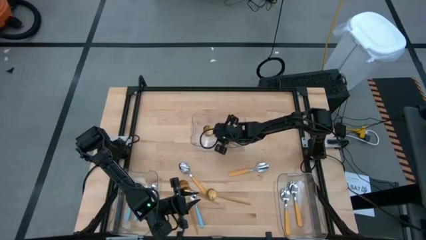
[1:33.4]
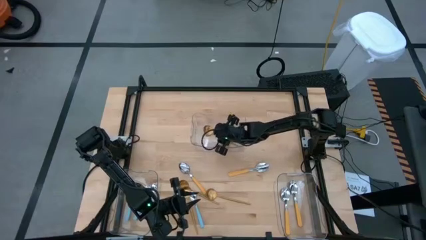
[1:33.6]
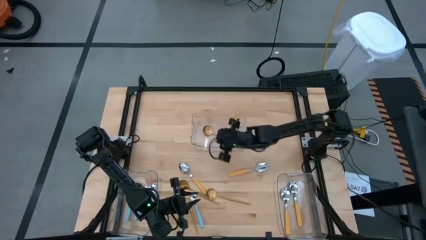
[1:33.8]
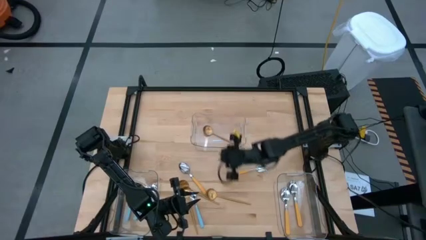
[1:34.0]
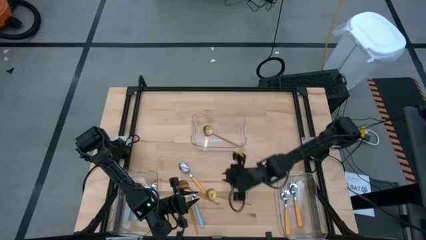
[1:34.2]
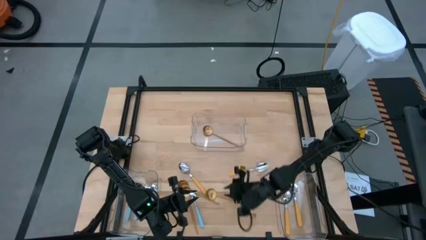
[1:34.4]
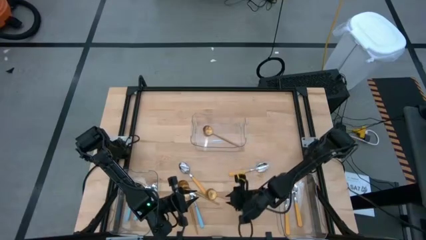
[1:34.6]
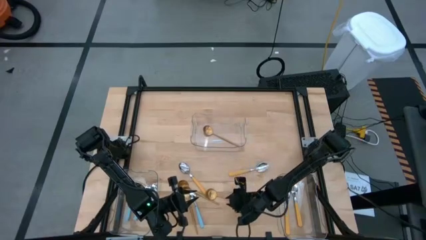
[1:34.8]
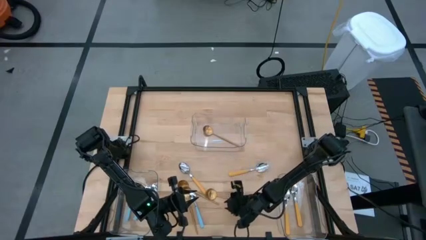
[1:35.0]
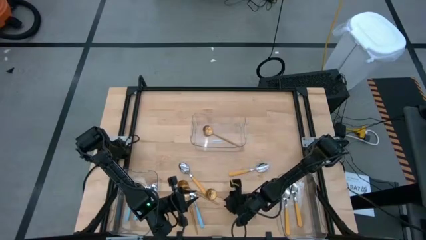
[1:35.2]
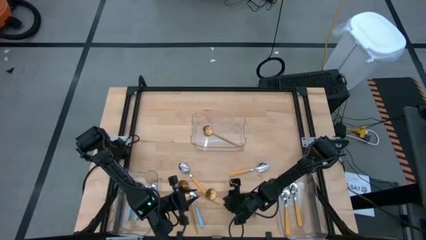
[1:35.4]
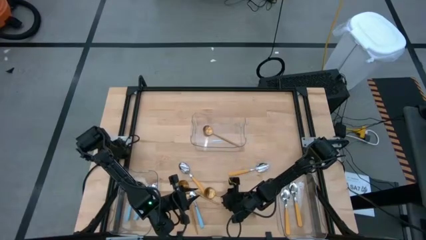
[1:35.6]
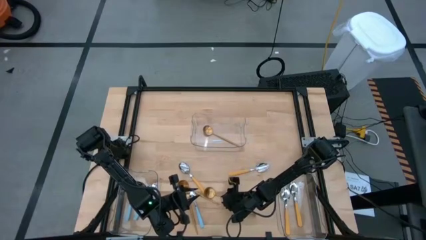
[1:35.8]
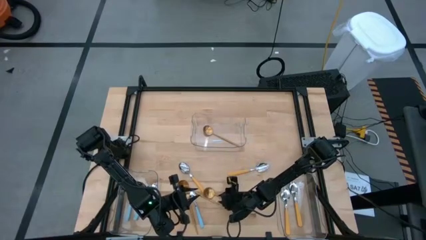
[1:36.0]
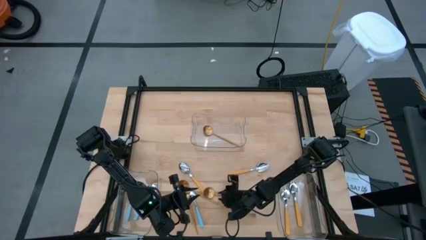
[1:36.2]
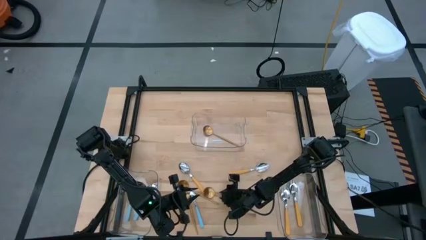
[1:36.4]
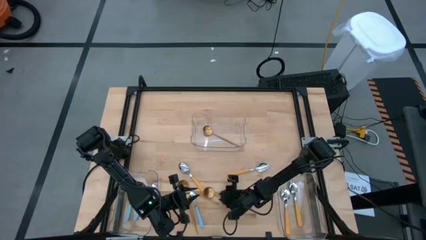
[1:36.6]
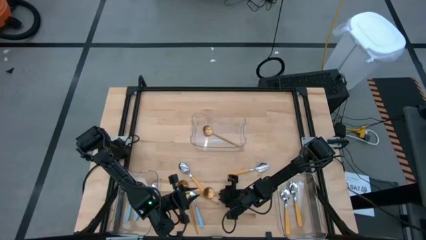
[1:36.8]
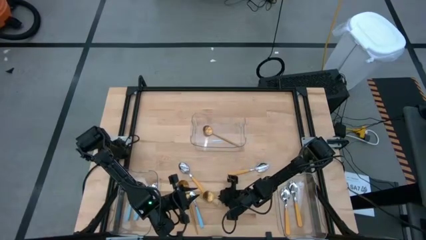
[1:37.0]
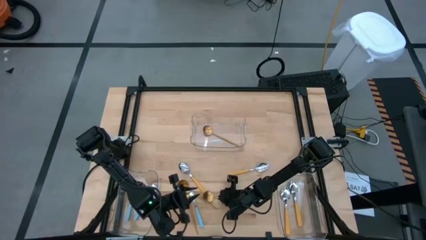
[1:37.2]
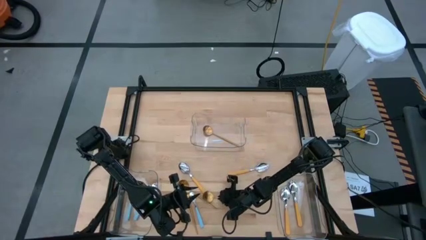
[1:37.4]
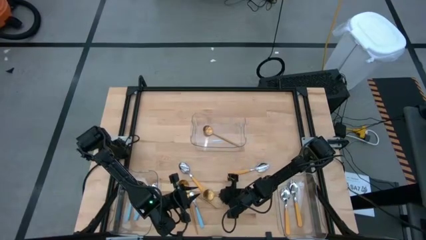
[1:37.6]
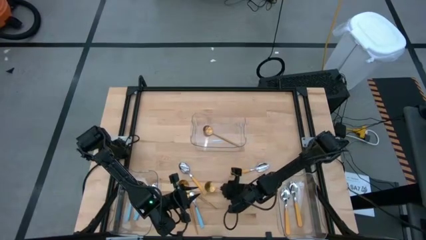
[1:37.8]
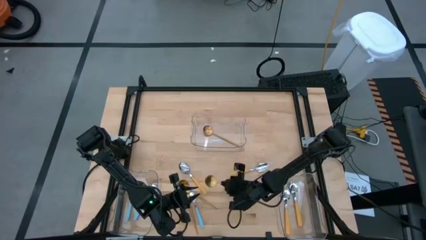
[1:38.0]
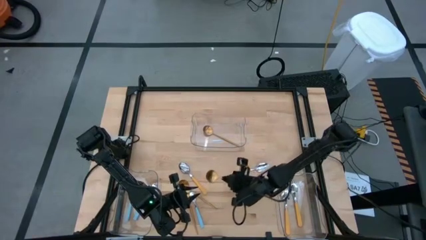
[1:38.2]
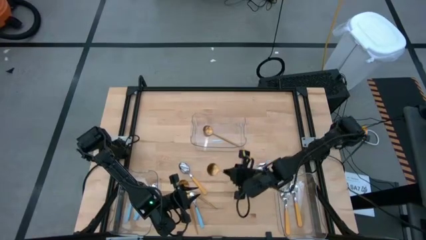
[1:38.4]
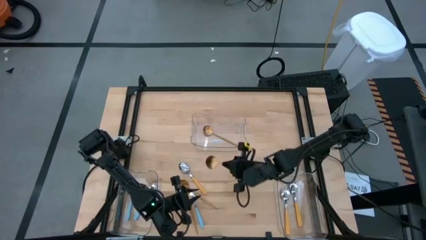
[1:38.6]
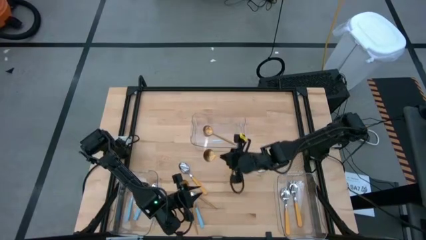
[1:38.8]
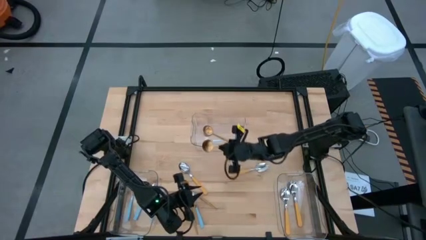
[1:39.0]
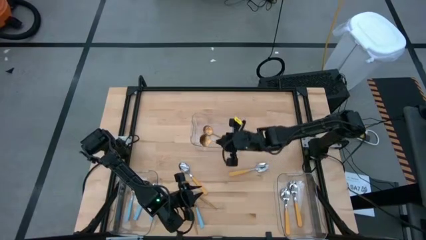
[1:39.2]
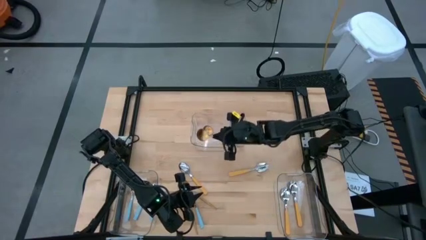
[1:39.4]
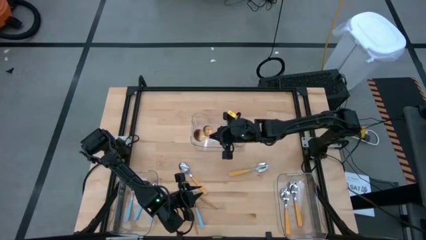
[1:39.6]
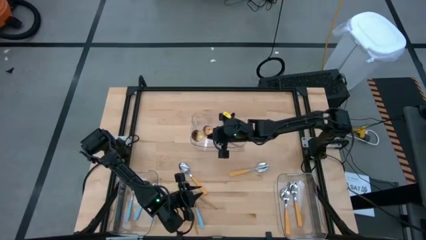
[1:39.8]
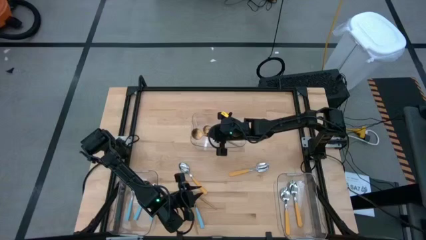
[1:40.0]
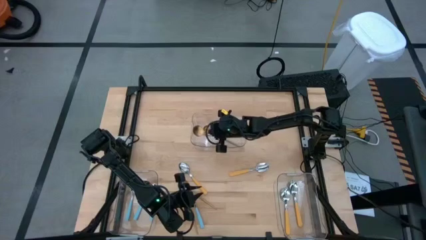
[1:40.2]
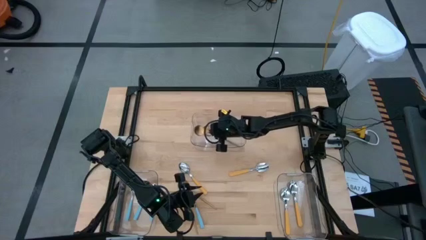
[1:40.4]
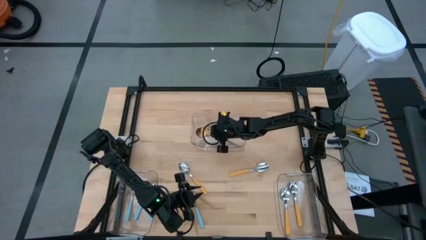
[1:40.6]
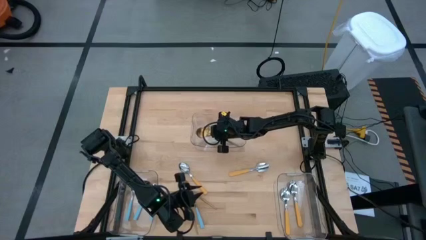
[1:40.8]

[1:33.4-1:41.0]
Task: Sort silverware by color (type)
Put the gold spoon into the top transparent bin

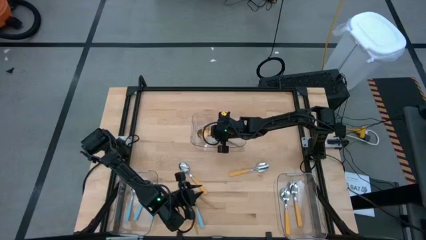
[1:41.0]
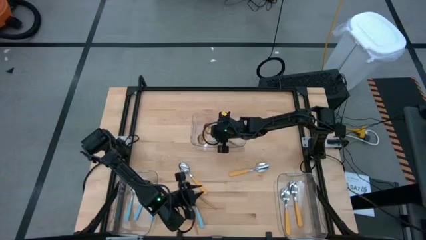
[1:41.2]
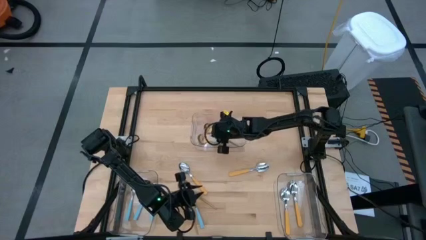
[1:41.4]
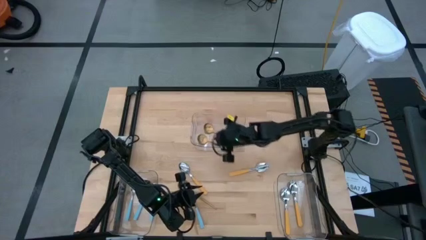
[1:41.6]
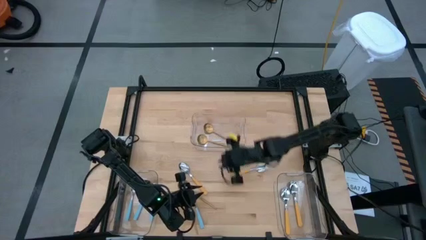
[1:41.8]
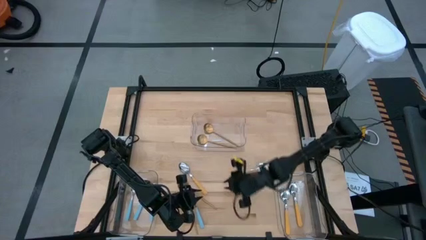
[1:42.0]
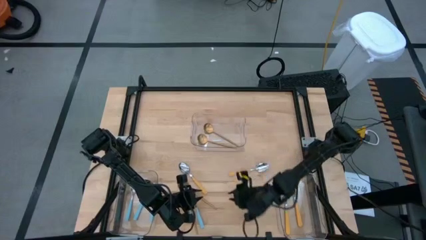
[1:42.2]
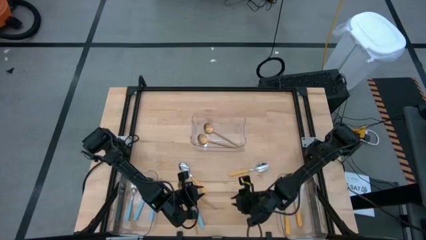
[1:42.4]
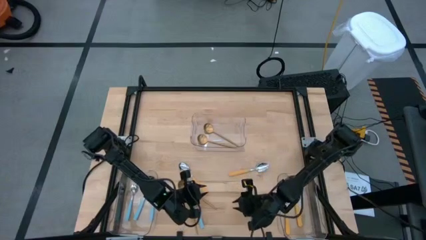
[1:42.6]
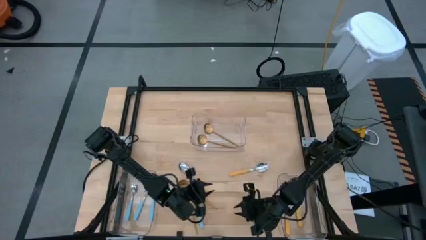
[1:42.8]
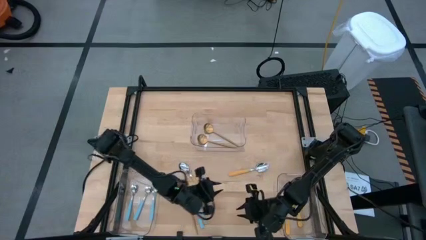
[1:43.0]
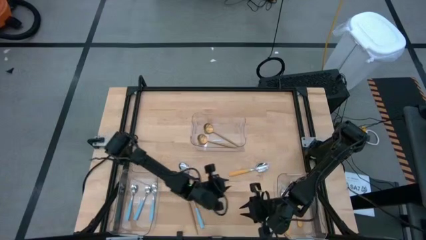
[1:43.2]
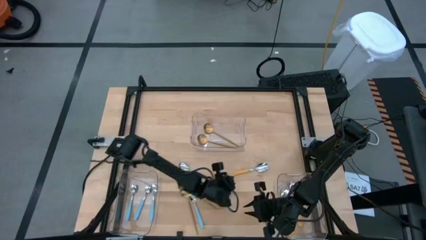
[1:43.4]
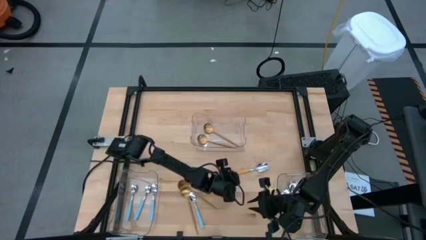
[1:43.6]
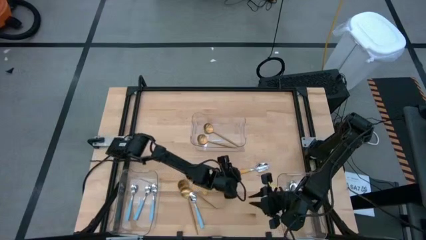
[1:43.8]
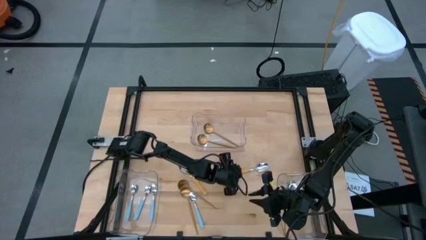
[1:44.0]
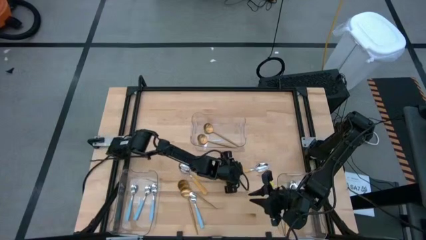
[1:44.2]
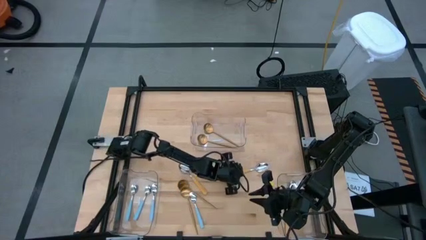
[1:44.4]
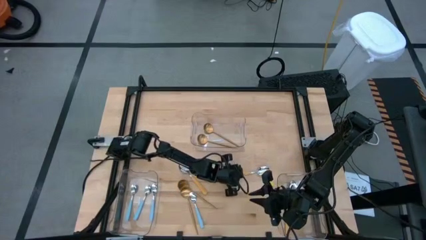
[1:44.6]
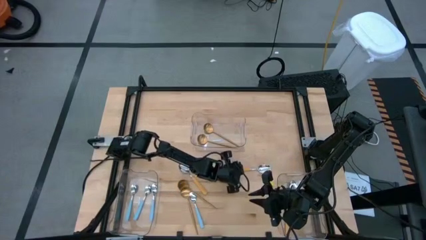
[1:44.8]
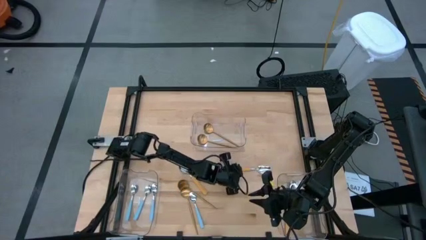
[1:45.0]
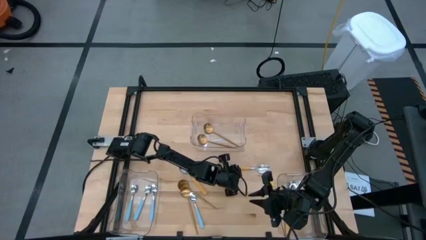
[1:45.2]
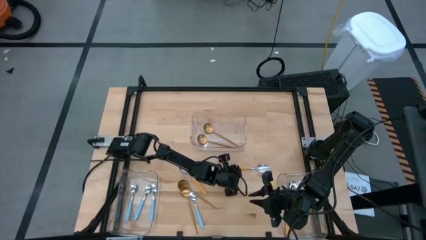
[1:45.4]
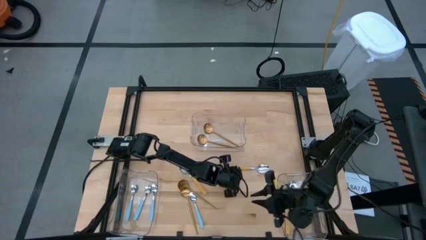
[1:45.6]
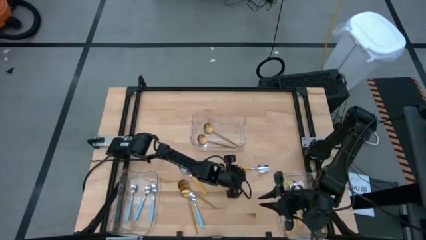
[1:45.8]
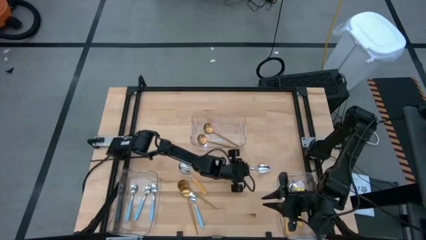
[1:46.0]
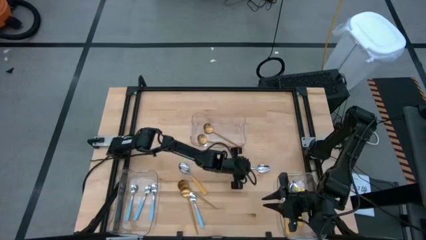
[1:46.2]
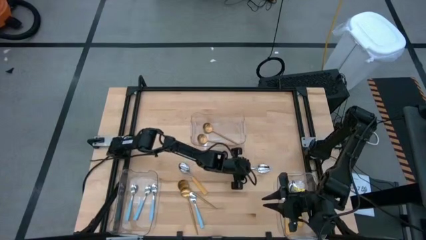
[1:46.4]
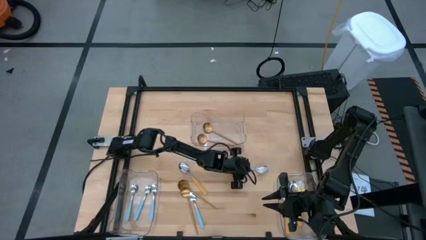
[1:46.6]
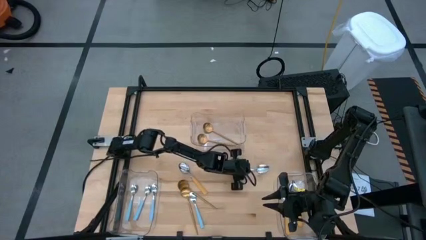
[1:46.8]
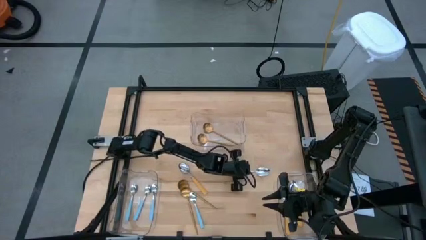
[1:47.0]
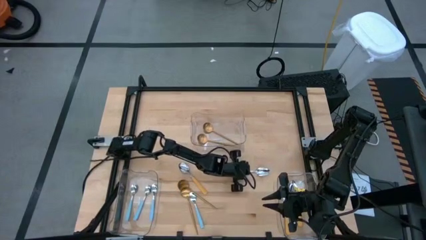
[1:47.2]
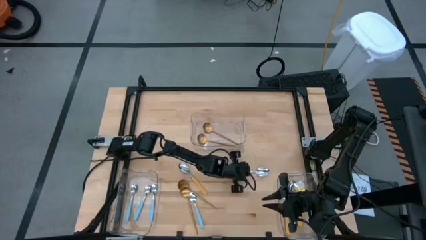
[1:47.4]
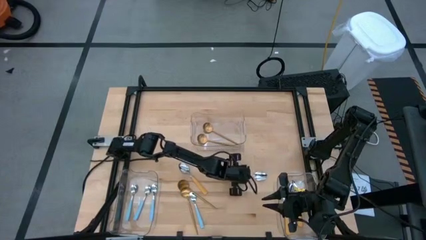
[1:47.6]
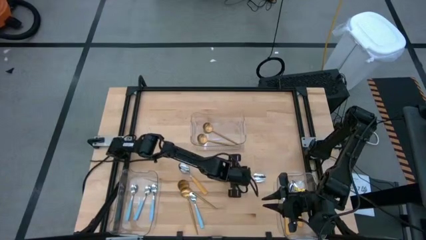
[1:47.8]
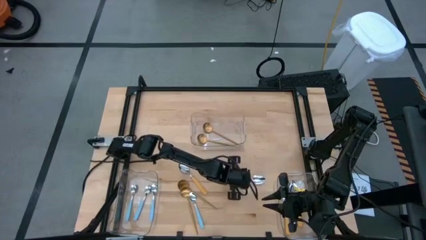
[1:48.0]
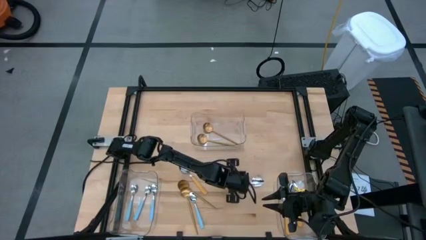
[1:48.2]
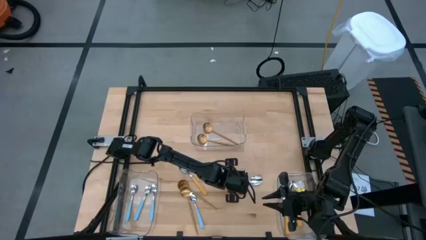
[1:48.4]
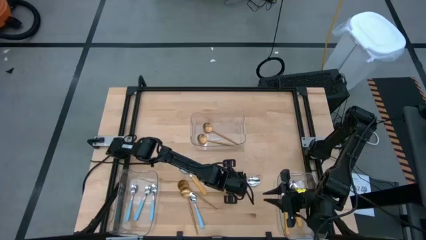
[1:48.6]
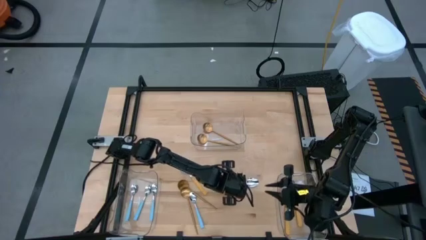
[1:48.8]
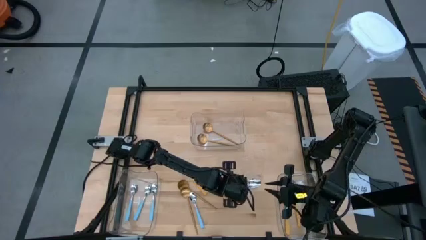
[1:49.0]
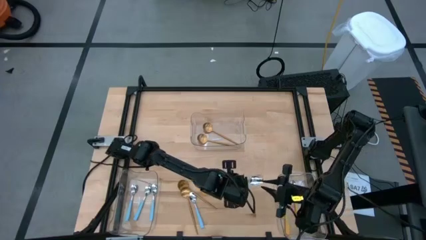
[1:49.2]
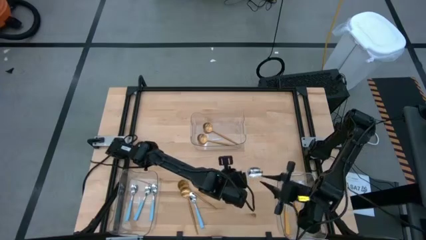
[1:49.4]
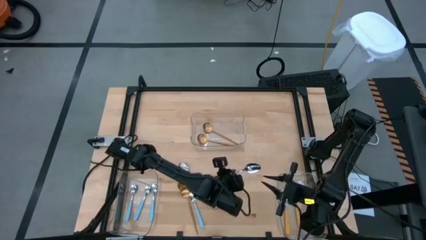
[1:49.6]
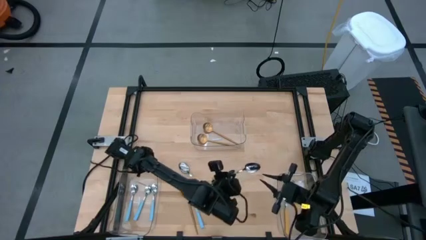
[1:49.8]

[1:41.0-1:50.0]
Put the yellow spoon into the bottom right transparent bin
